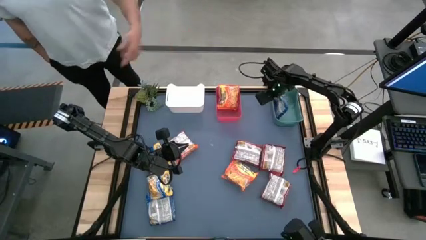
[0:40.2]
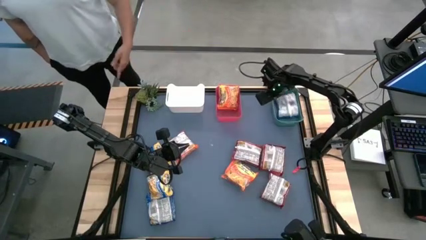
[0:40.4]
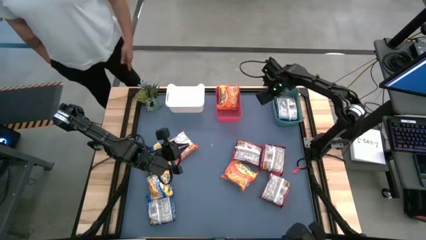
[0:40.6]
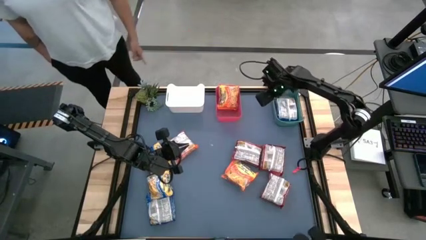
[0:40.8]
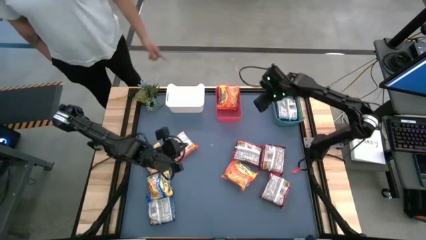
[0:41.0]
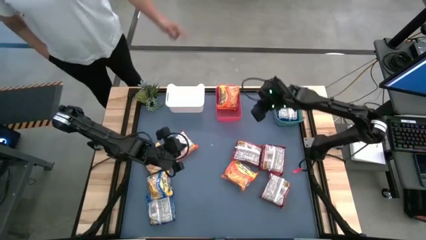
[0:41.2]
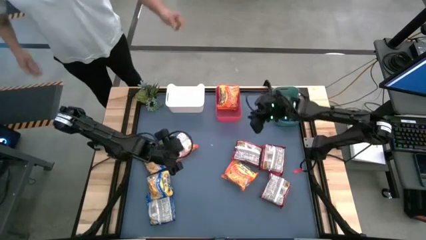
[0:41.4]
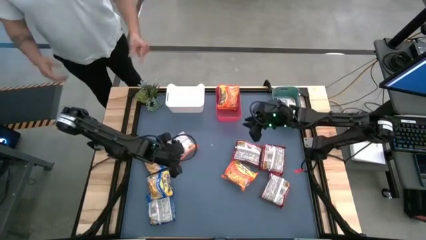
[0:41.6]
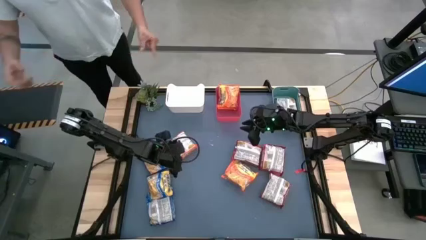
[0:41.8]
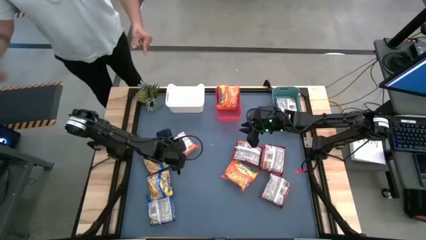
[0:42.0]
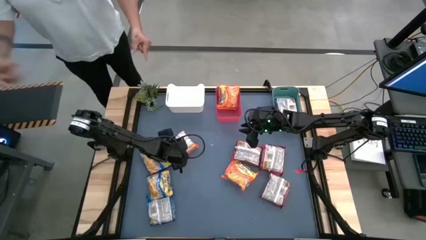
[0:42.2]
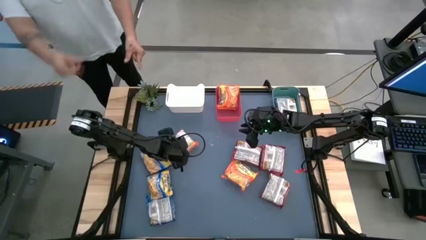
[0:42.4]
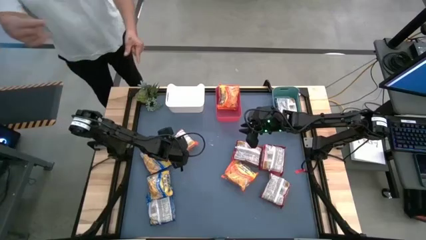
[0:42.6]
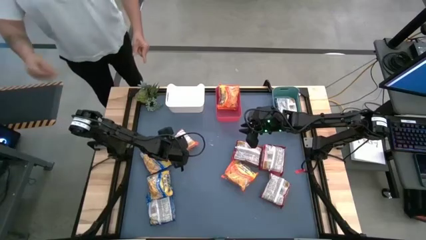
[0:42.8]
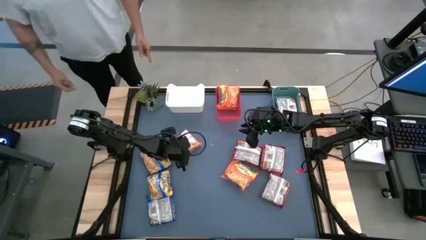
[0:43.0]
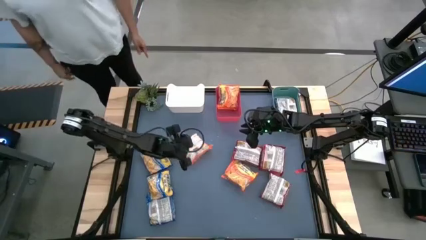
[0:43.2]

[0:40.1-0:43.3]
Task: Sort Maruchan noodles
Put the top orange noodle pack into the red bin

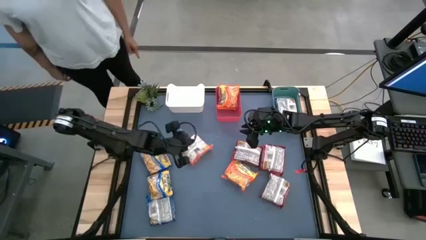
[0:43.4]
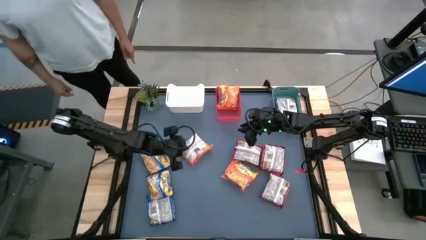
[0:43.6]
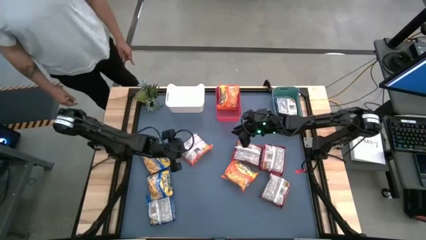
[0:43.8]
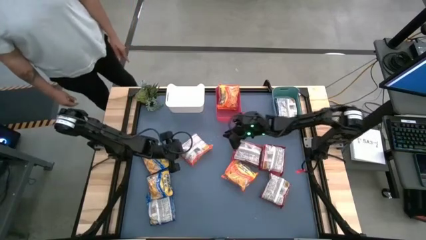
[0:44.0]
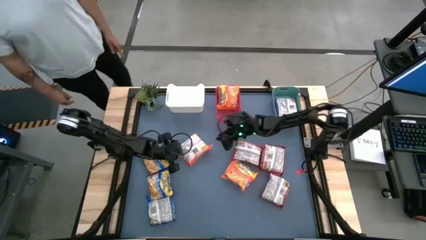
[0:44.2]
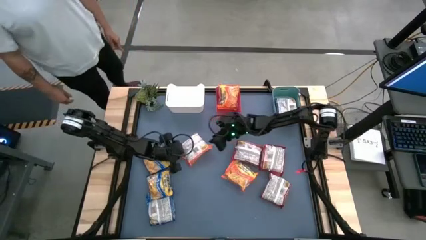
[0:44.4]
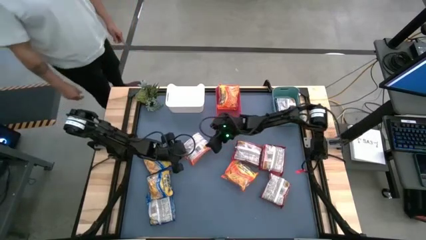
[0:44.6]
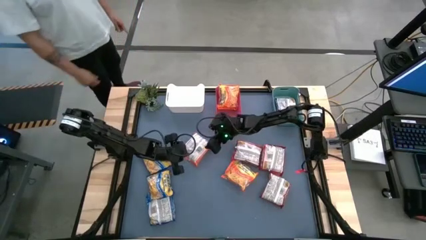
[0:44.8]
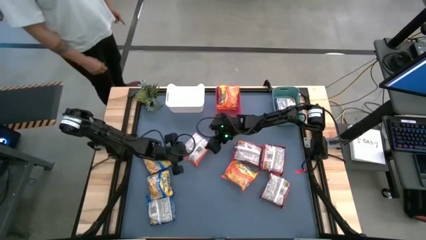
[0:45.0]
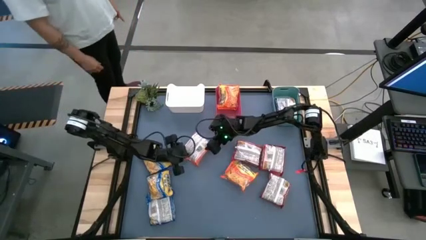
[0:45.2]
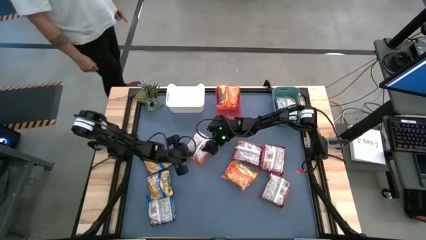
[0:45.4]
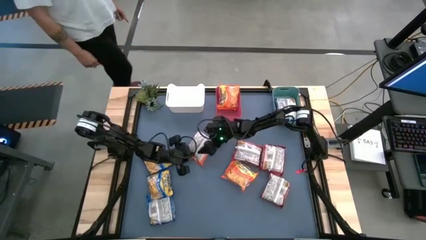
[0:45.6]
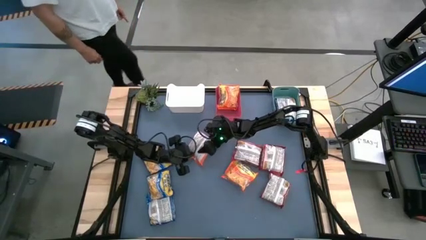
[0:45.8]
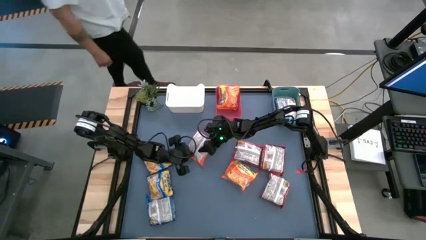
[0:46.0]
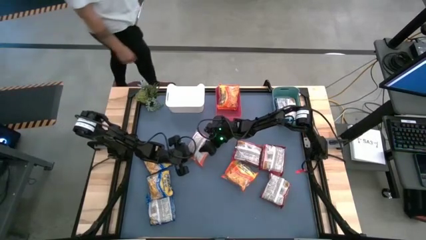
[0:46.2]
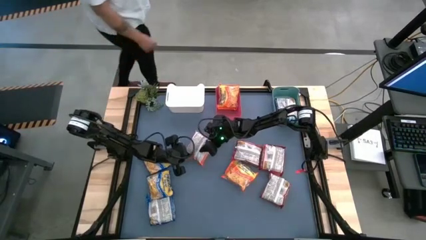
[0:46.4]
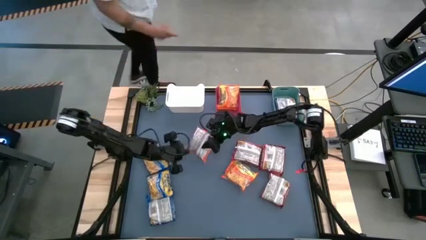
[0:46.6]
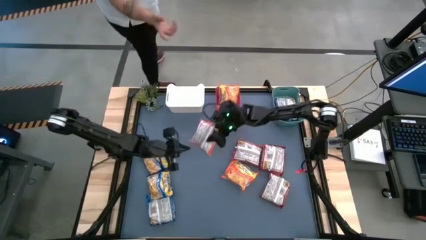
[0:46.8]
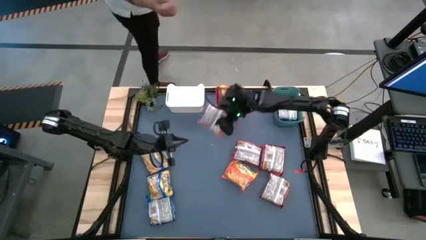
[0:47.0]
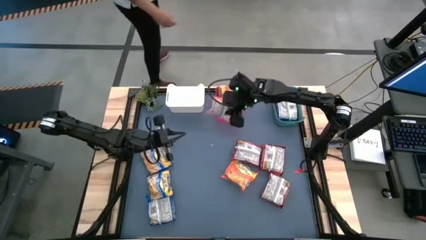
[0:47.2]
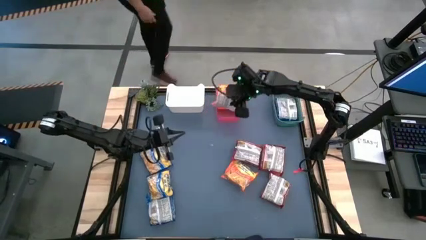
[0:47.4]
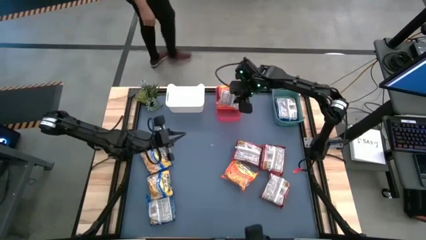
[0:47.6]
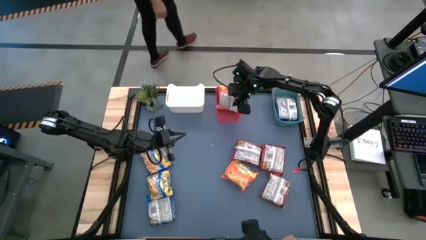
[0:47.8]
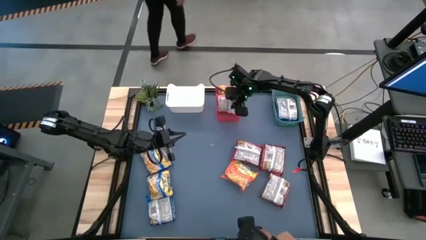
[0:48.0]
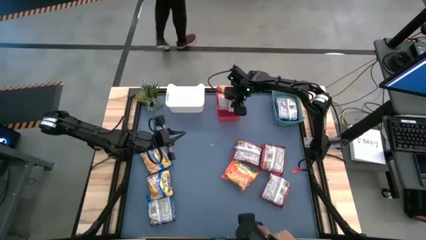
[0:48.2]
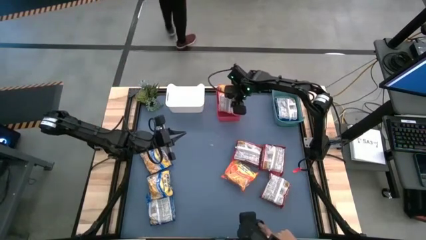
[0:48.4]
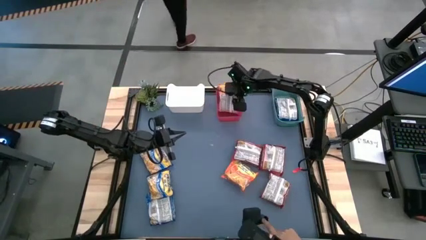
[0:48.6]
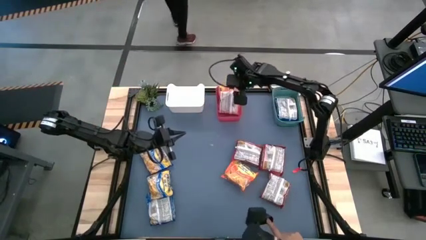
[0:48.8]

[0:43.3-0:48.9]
Put the top orange noodle pack into the red bin

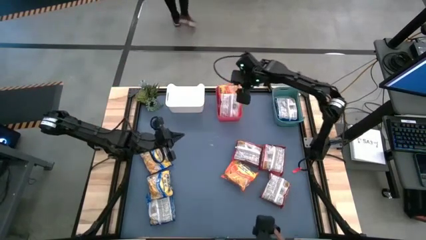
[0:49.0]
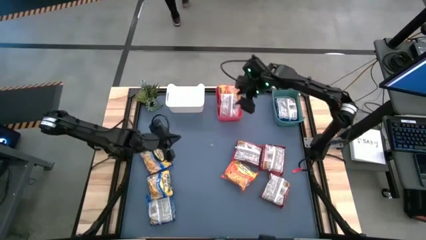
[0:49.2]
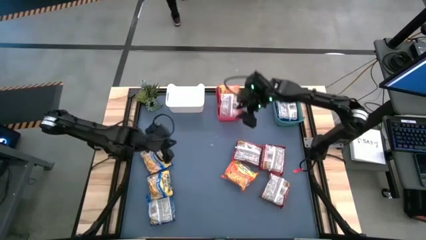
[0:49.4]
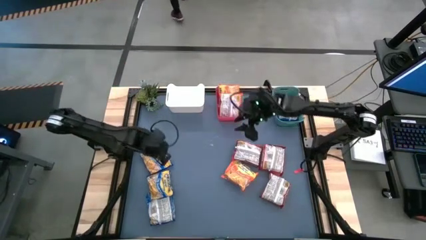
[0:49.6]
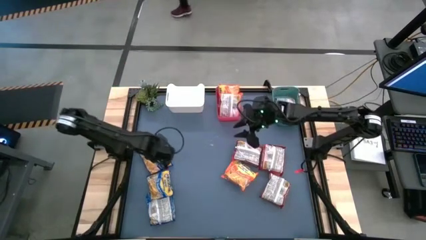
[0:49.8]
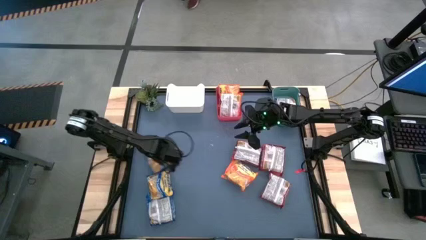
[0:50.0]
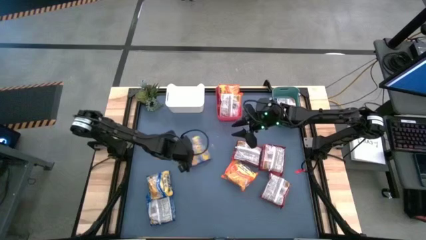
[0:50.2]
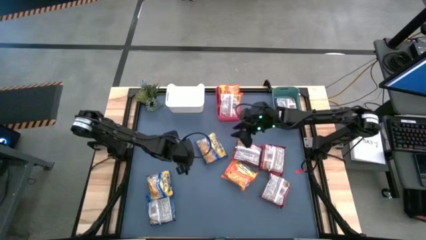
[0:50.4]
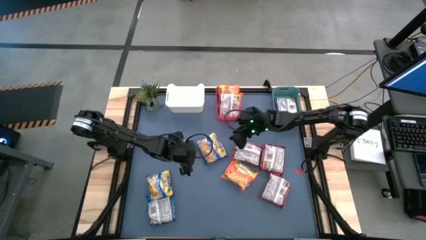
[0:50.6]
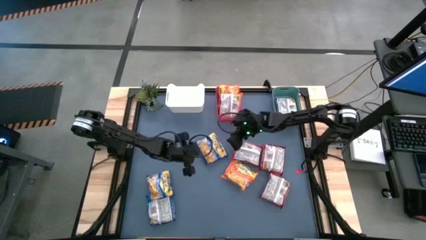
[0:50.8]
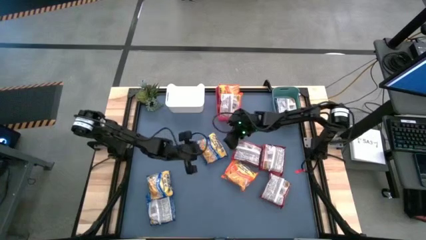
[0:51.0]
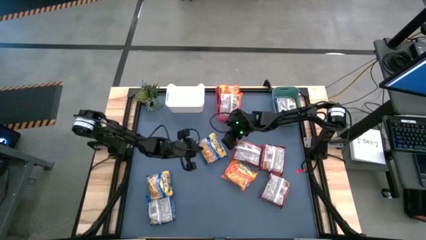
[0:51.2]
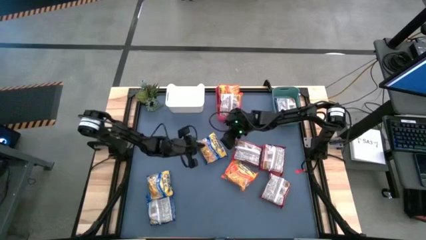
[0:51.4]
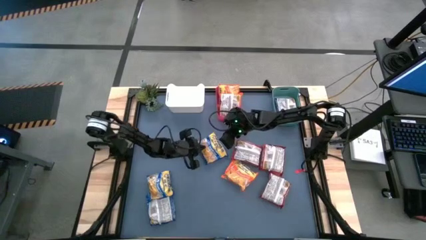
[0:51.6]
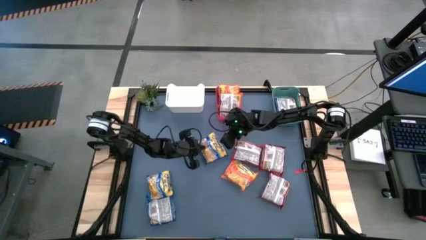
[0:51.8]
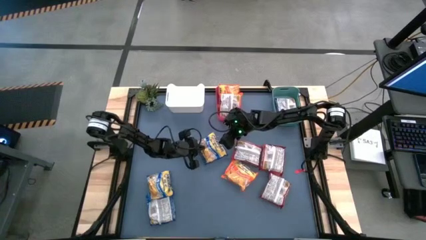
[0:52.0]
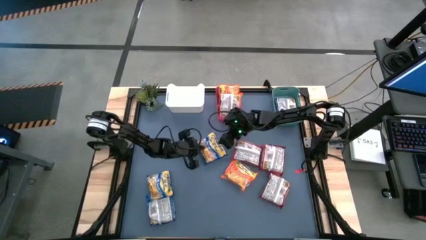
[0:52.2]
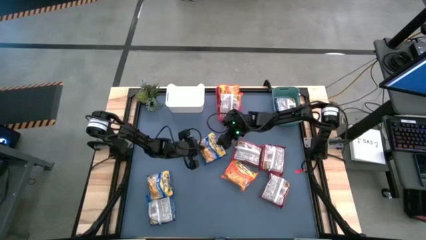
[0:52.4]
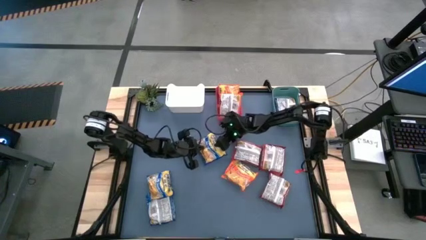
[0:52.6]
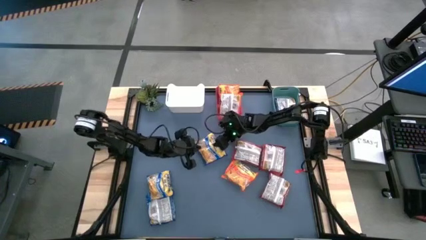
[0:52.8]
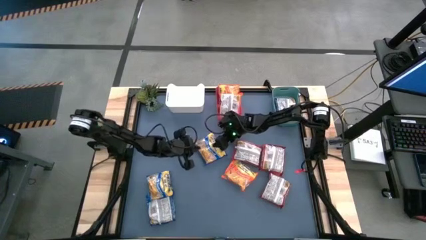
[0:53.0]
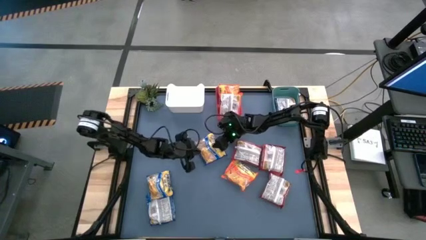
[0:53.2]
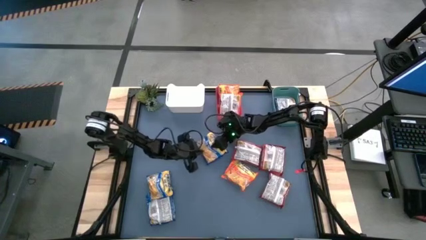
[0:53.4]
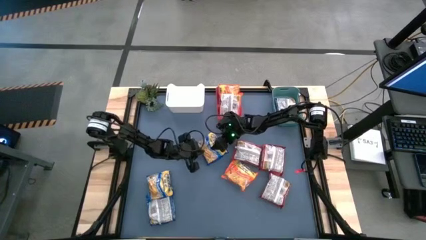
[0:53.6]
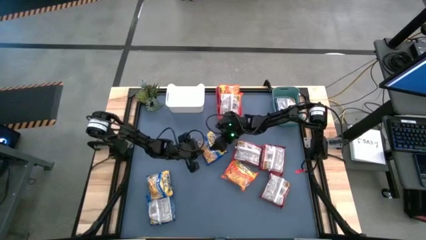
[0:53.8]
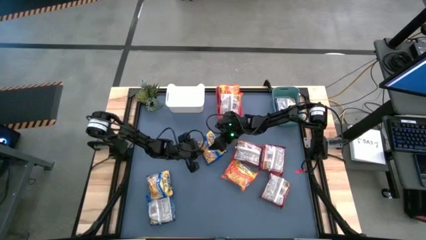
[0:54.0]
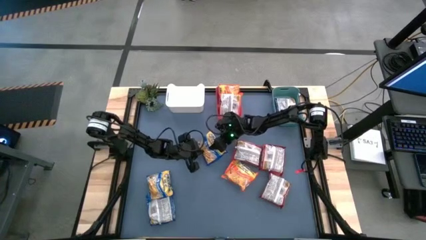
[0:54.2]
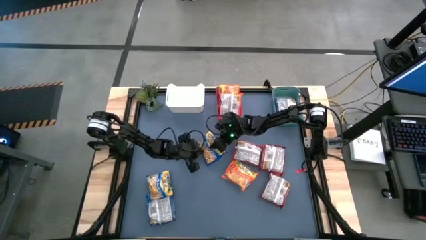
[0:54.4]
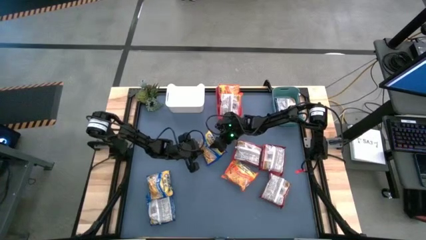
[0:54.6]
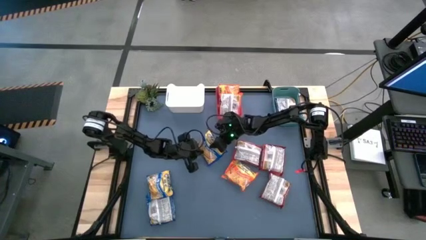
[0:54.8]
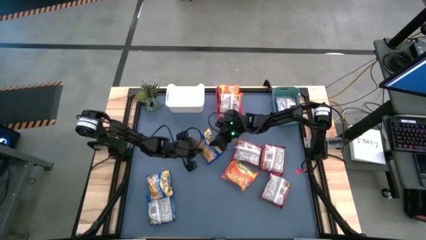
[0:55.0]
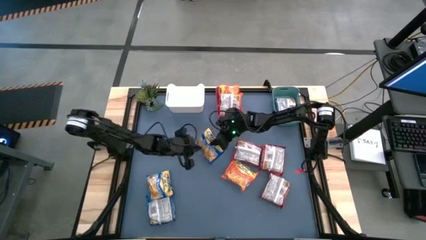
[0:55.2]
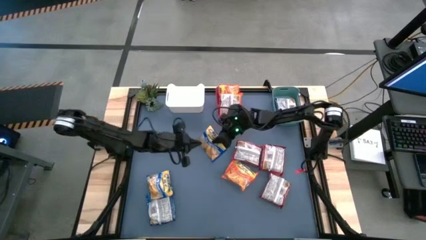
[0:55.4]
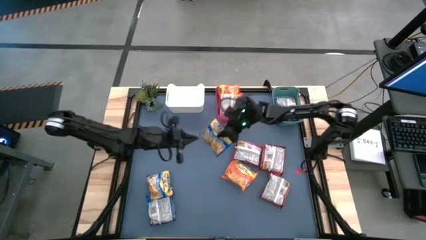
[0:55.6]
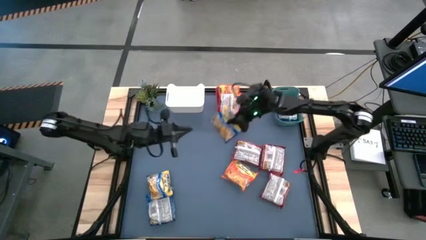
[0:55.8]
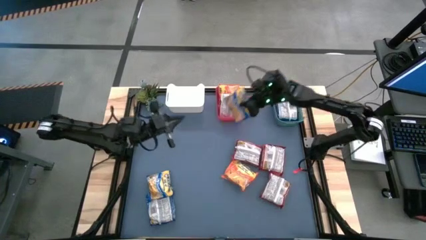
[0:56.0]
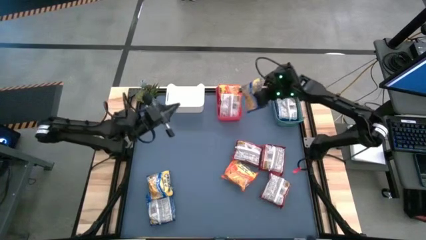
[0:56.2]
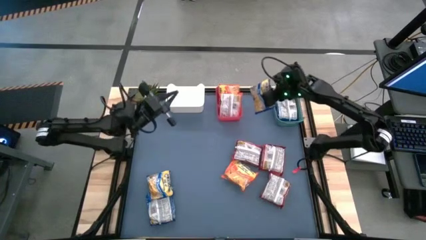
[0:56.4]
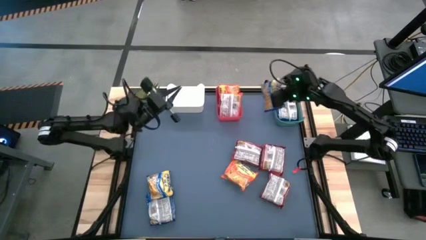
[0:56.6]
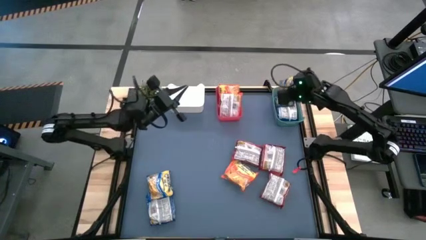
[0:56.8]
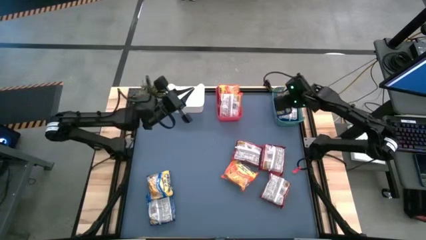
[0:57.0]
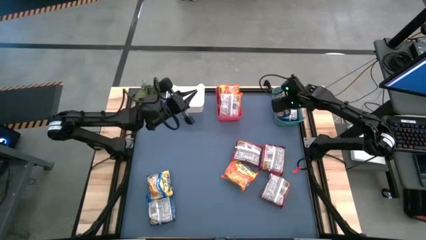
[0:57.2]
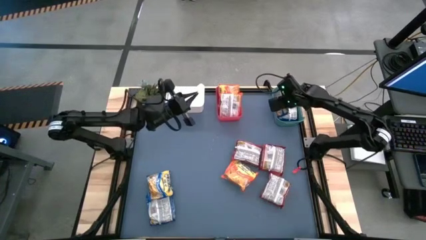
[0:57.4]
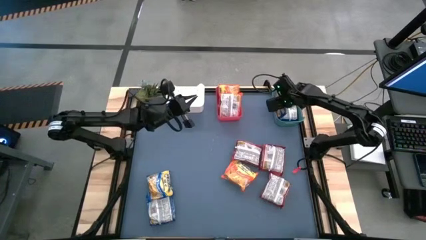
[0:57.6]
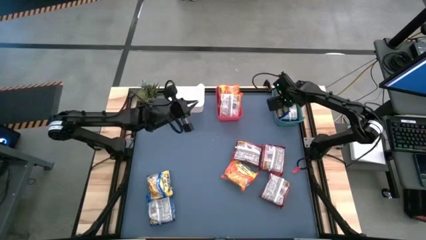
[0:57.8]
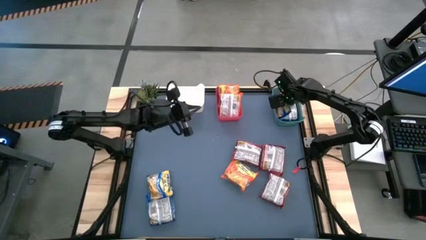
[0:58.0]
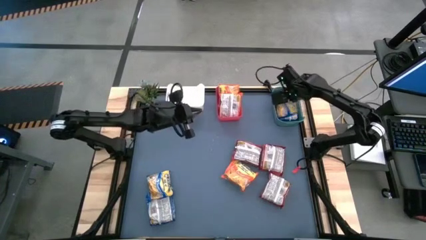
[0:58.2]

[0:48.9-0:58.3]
Put the top blue noodle pack into the green bin
